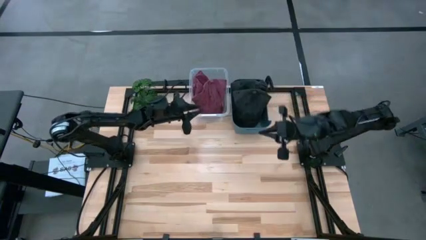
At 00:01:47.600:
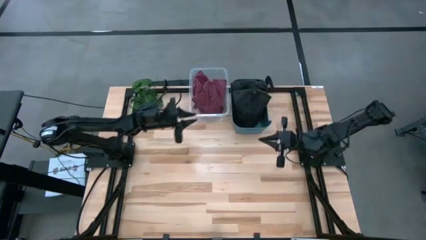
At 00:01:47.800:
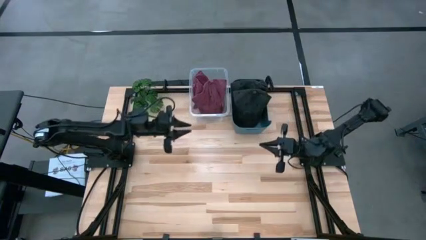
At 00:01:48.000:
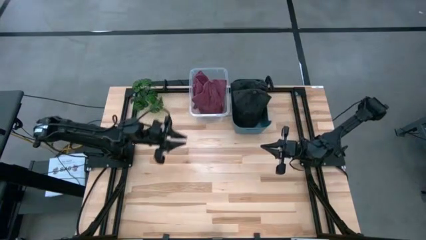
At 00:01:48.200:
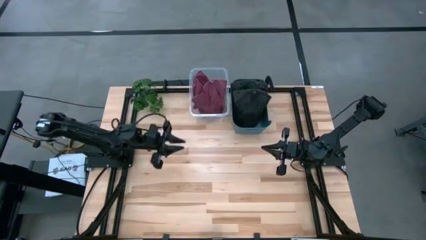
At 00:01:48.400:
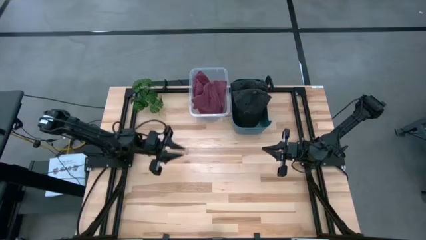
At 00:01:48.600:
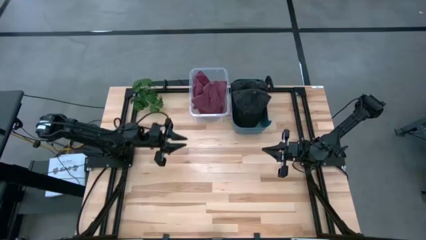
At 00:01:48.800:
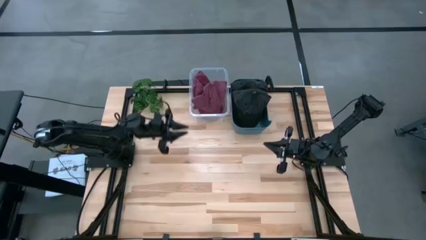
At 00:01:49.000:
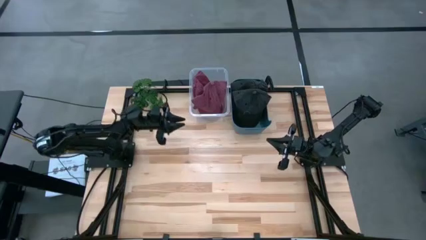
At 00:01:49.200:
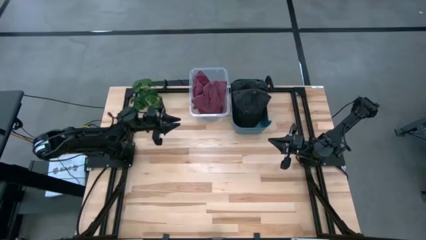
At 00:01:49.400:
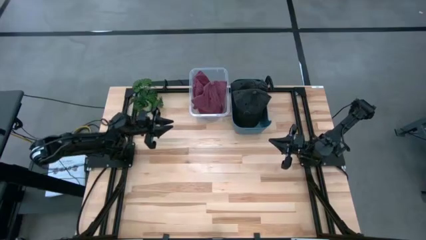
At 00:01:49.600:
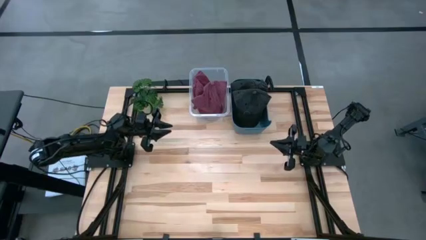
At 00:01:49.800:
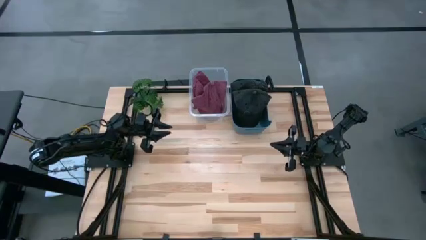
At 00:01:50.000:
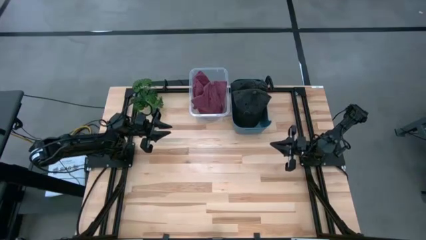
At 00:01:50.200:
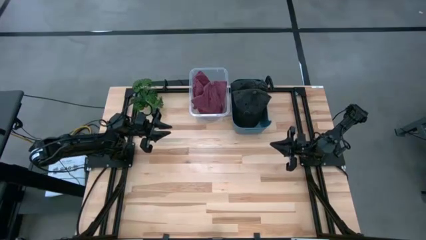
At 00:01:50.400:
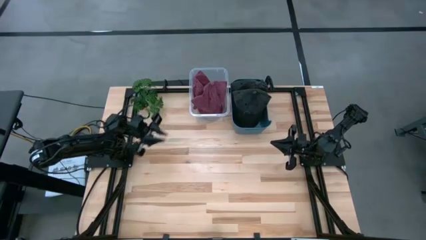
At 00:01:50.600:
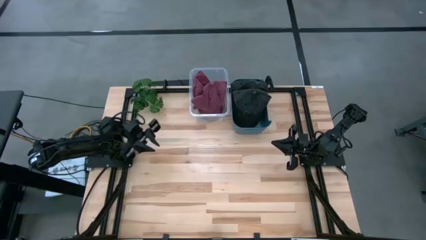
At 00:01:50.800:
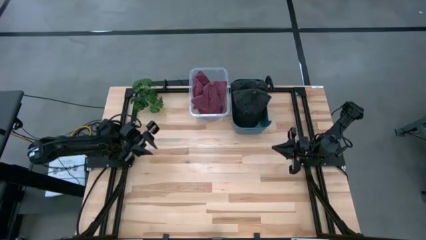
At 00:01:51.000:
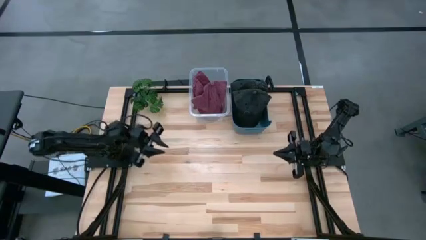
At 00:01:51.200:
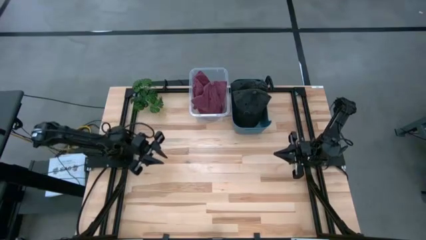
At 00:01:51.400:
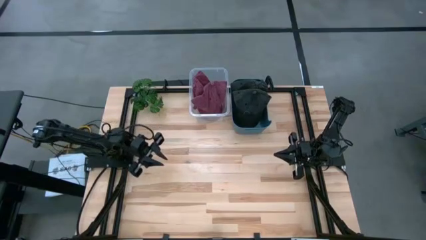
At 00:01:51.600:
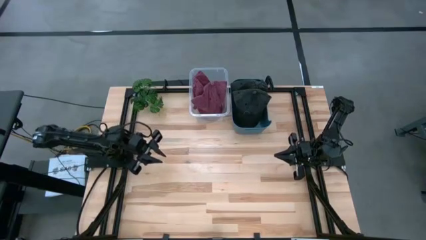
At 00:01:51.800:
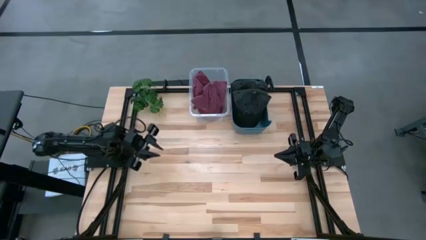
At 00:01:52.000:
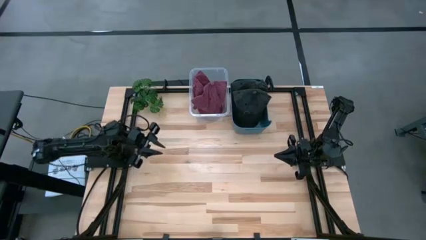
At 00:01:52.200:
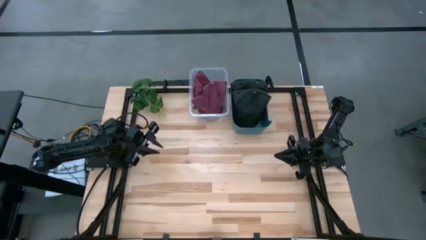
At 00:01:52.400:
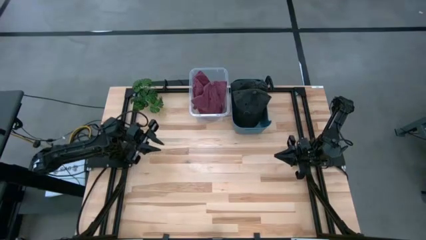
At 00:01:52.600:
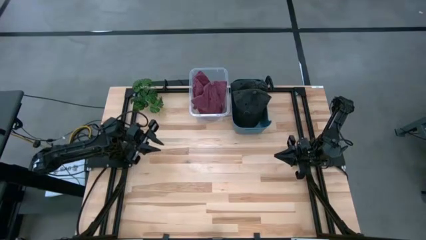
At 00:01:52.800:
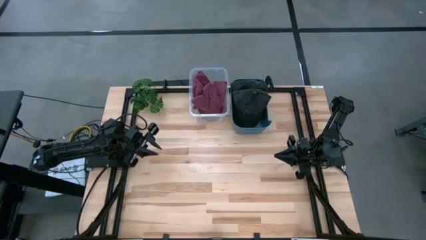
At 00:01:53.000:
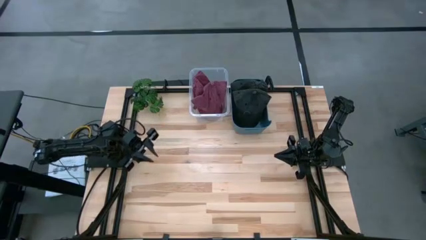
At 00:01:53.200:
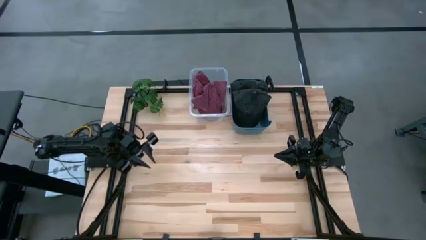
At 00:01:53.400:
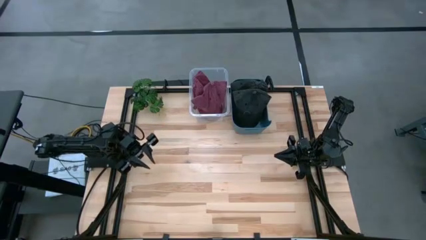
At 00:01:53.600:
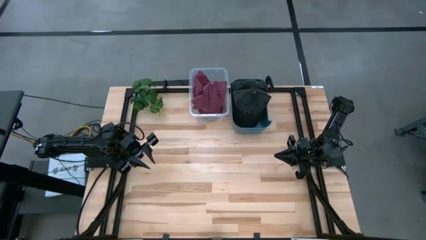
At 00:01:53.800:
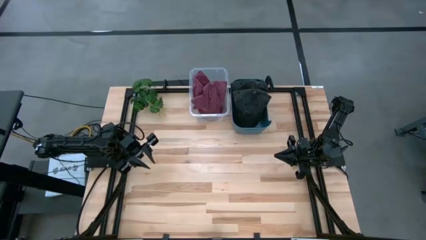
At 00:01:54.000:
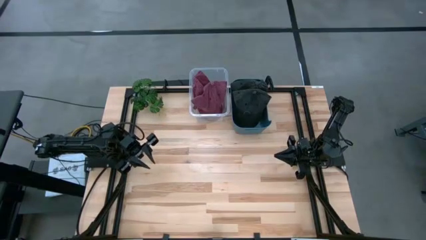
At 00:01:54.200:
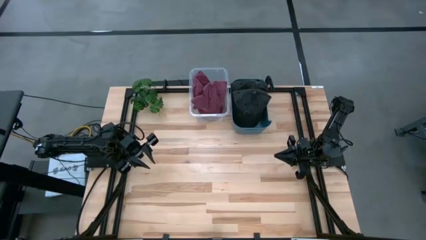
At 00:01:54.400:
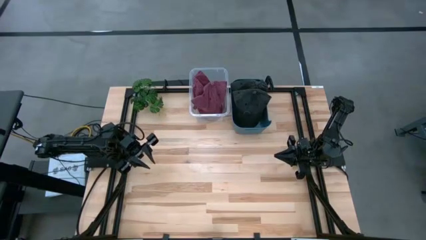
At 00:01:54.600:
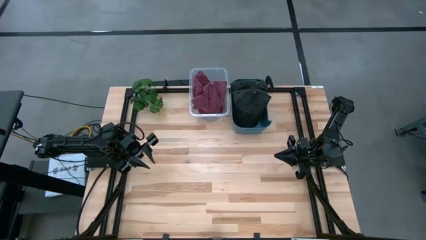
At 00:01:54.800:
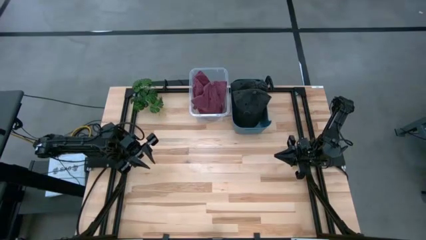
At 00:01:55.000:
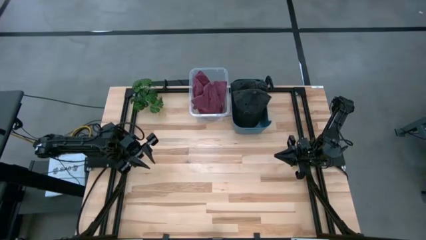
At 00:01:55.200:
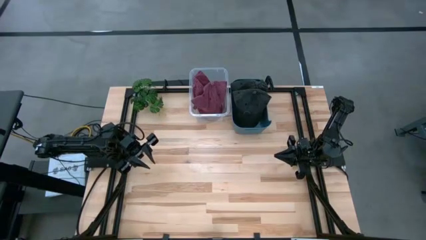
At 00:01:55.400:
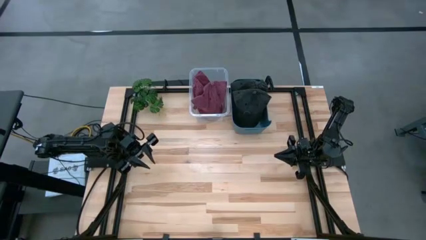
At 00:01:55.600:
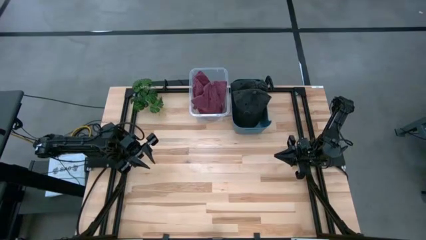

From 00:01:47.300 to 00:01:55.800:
Task: Pick & Place hat
Return to Home Position
